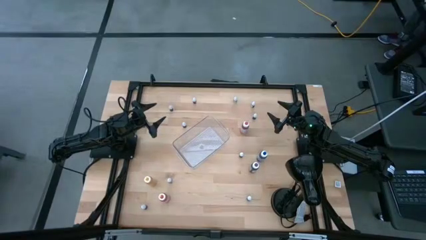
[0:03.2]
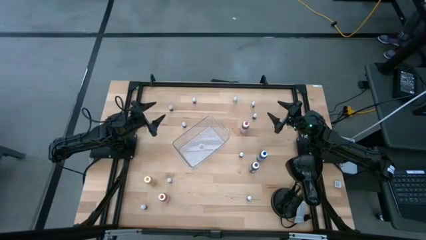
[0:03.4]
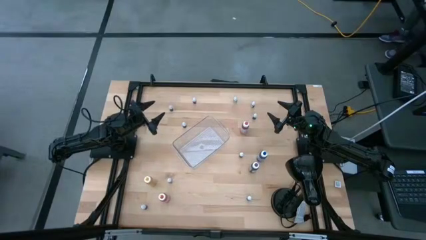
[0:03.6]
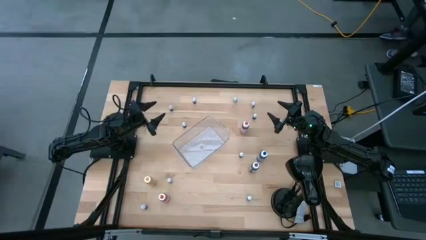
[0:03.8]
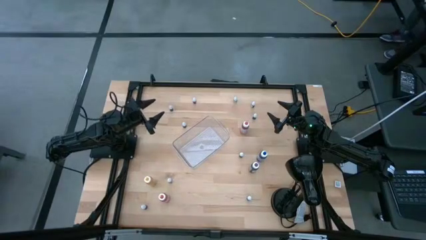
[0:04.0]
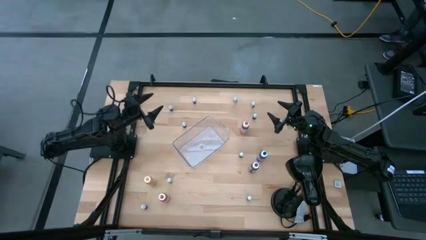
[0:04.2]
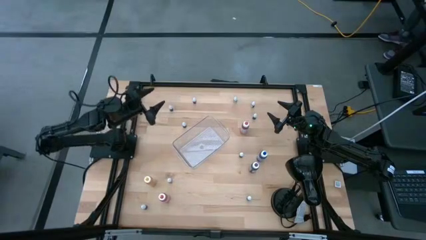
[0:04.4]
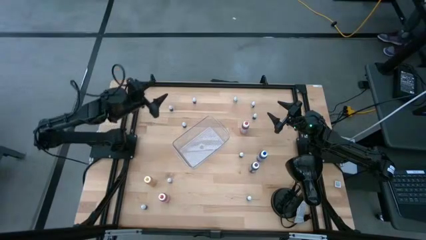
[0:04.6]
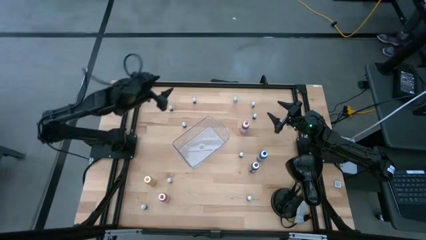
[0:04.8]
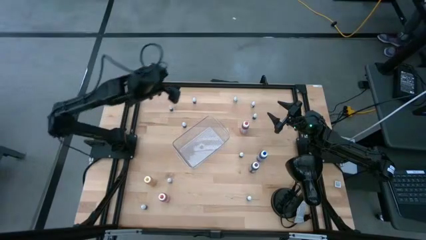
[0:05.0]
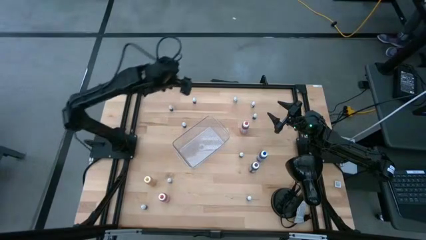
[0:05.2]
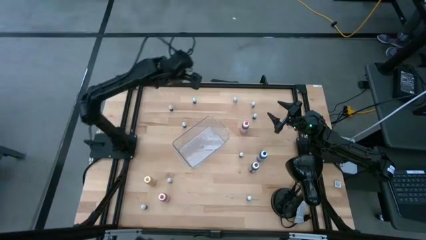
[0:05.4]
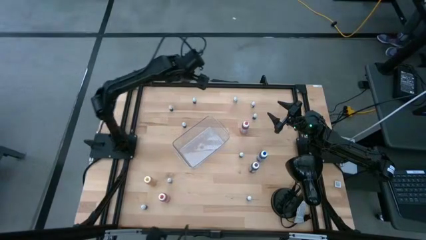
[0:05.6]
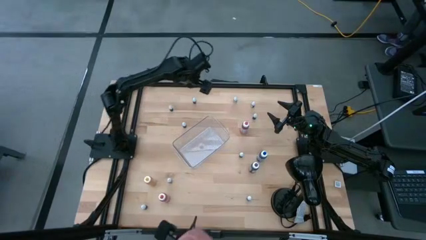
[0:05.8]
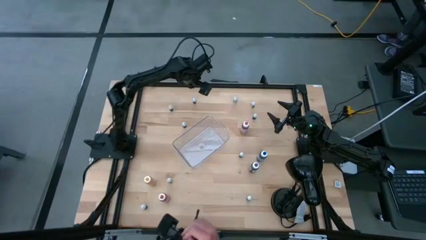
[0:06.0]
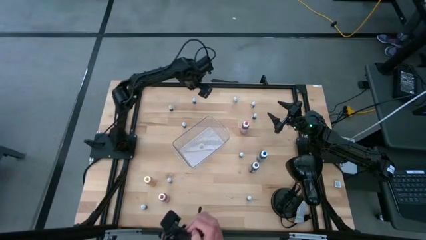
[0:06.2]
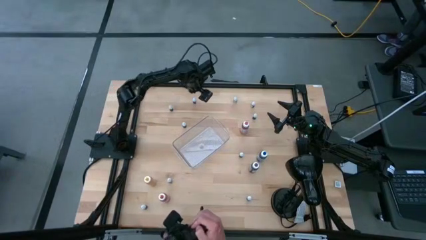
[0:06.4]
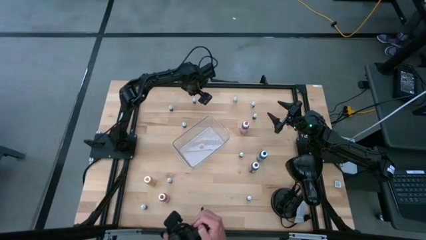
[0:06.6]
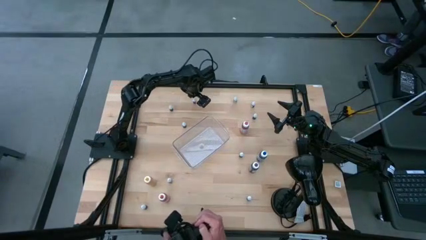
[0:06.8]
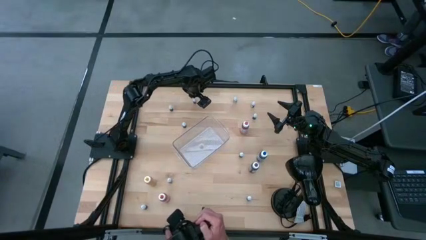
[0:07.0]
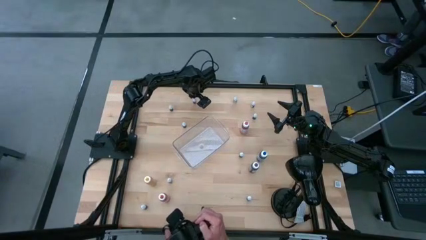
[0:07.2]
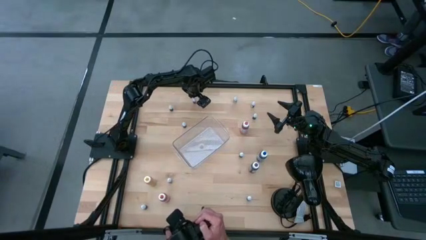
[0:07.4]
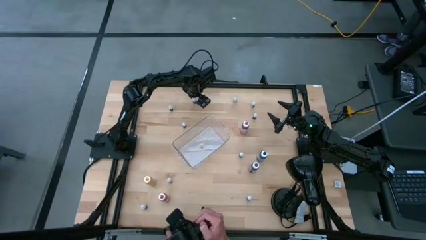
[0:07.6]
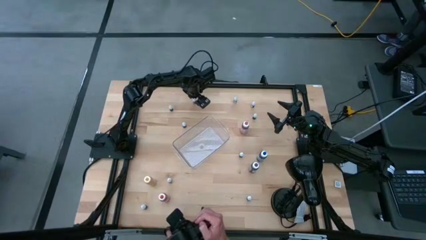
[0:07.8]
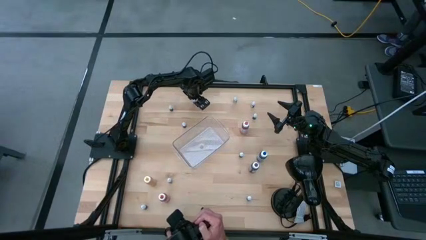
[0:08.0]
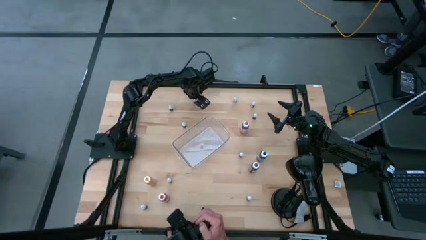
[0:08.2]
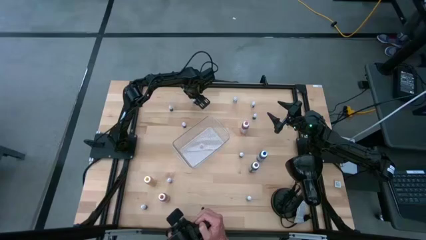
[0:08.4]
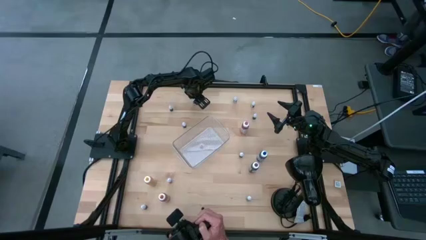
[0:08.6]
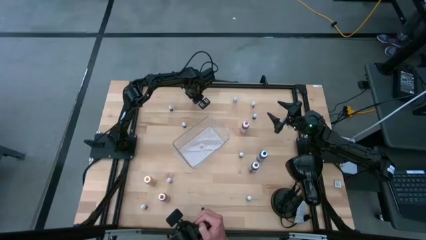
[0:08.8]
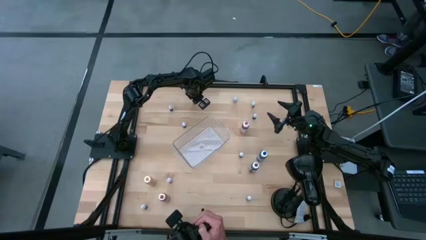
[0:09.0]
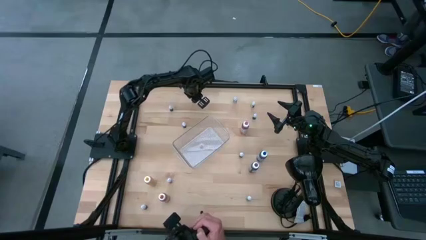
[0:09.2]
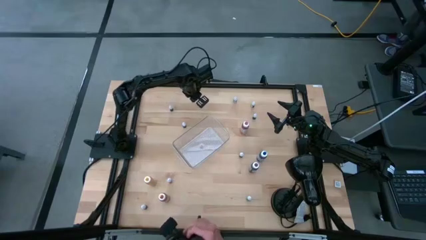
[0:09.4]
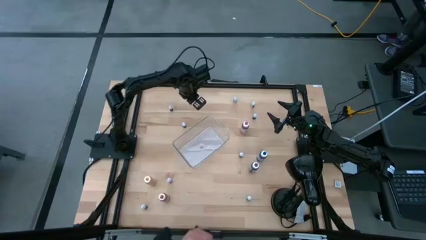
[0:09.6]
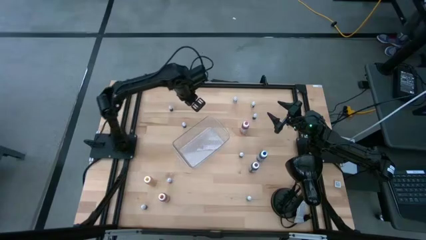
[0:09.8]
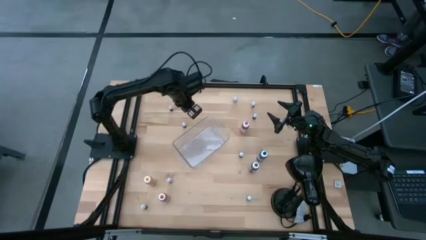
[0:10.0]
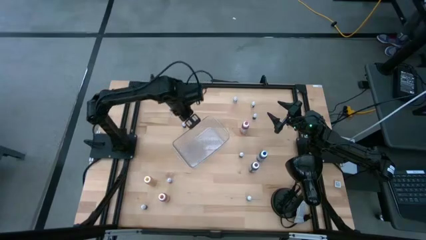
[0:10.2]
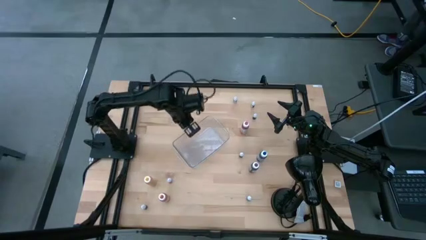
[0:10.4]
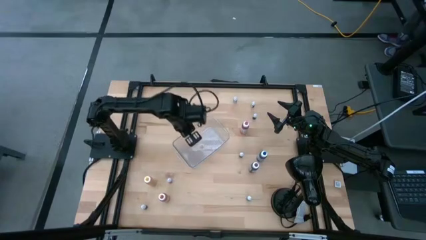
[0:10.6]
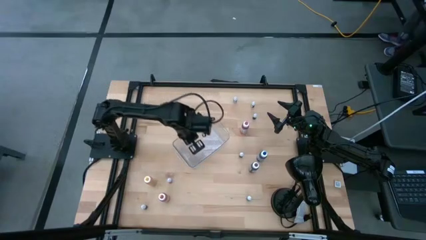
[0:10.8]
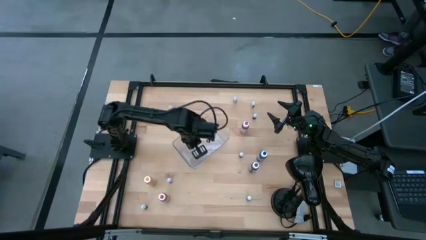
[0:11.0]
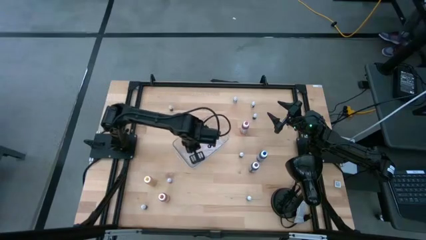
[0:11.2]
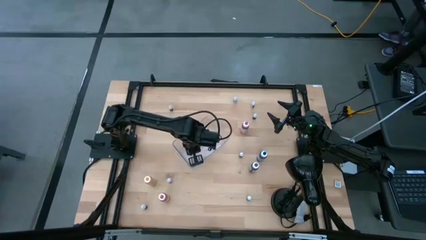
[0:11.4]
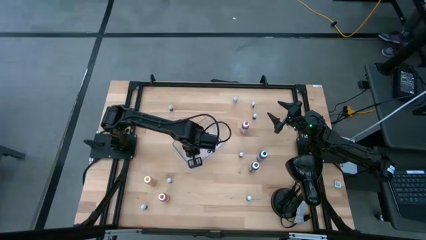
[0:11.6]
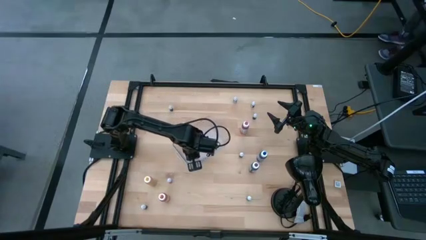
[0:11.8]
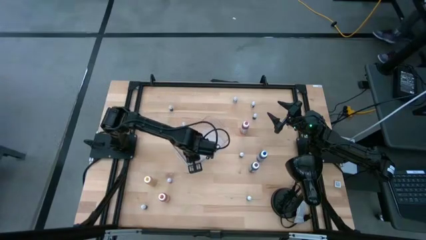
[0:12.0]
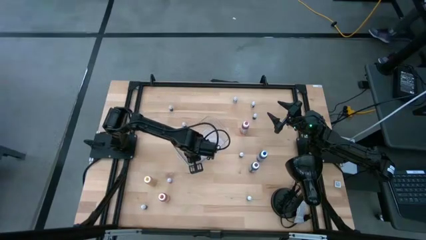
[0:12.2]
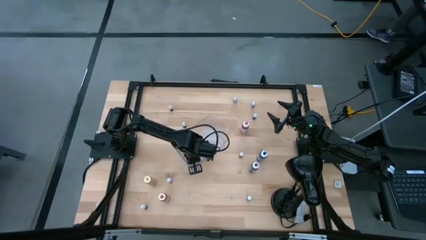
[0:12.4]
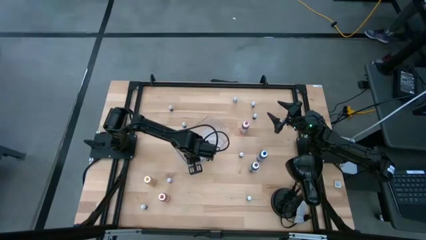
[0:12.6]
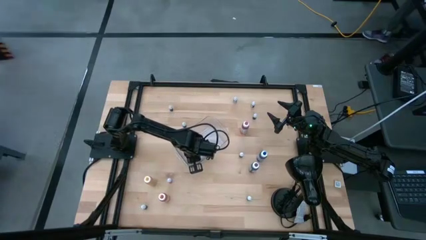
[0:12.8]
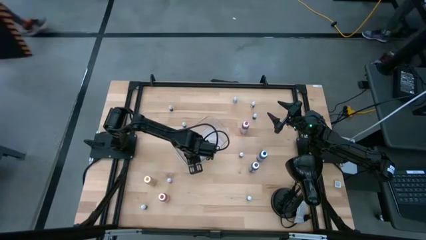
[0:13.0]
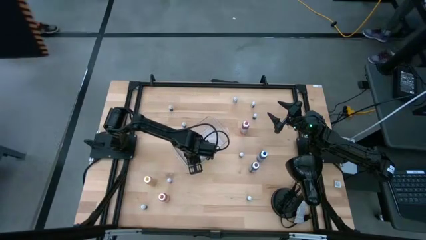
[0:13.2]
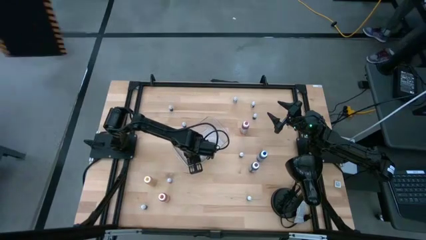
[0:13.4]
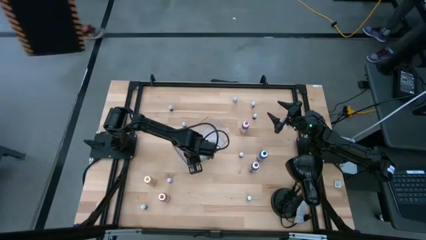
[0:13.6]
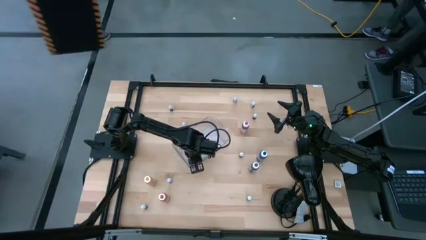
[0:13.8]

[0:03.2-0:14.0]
Task: Pick & Place food coloring
Put the small dark green food coloring bottle into the transparent bin

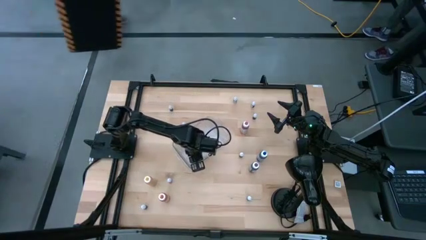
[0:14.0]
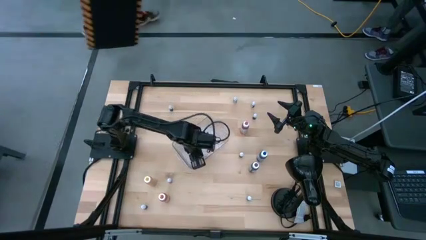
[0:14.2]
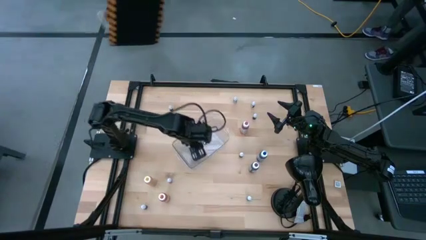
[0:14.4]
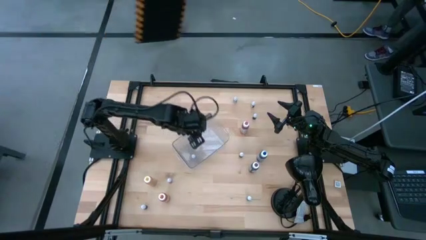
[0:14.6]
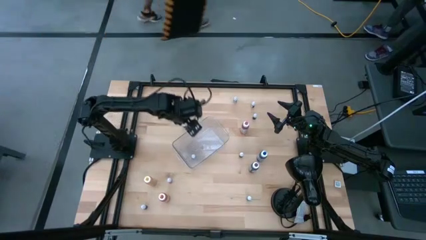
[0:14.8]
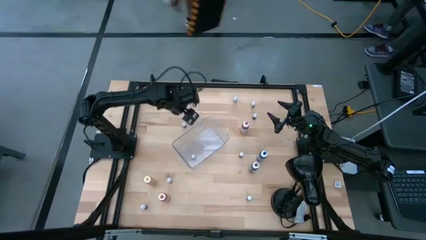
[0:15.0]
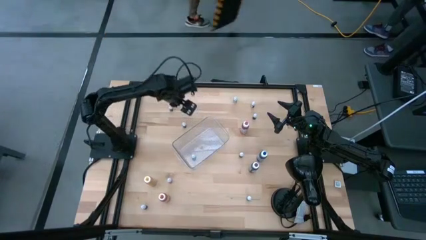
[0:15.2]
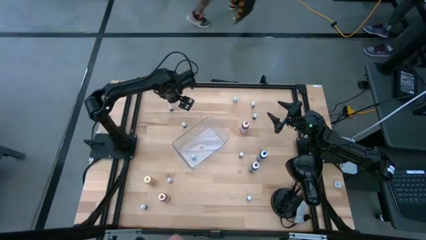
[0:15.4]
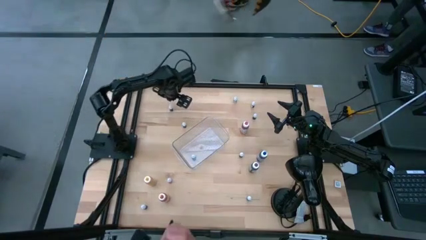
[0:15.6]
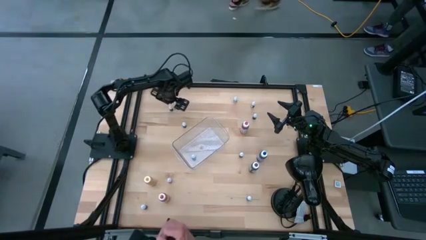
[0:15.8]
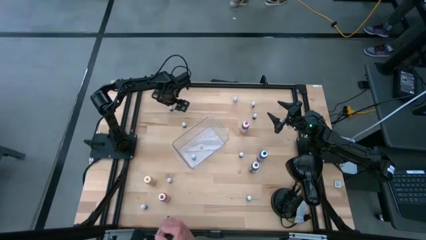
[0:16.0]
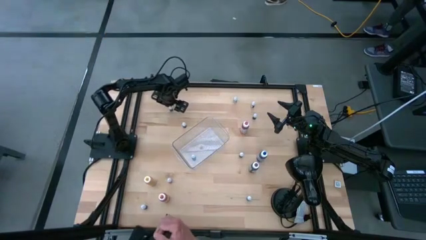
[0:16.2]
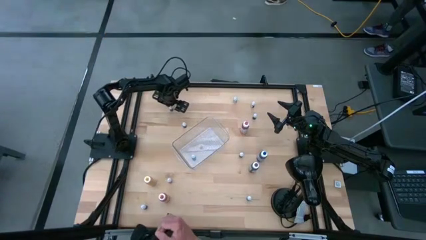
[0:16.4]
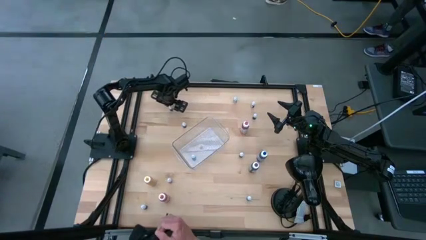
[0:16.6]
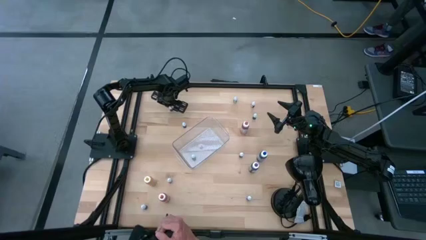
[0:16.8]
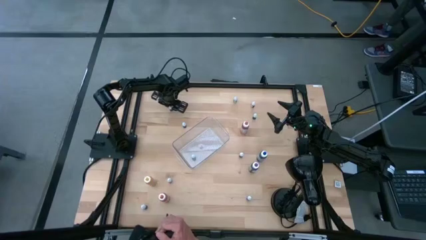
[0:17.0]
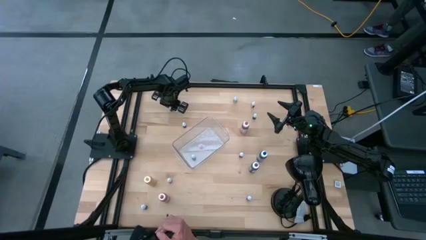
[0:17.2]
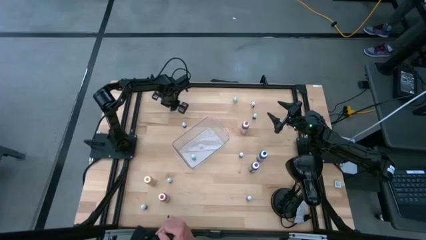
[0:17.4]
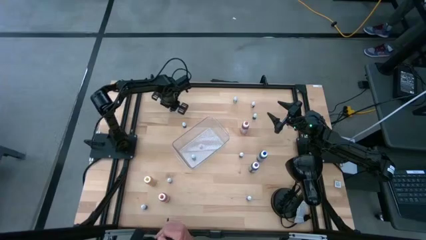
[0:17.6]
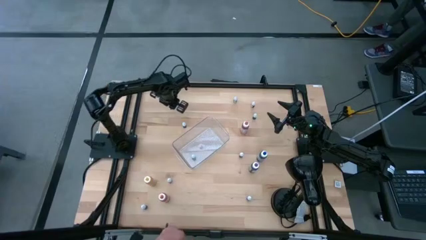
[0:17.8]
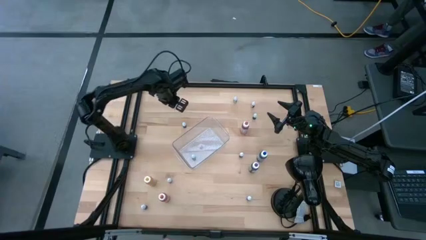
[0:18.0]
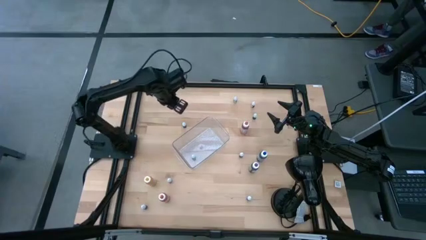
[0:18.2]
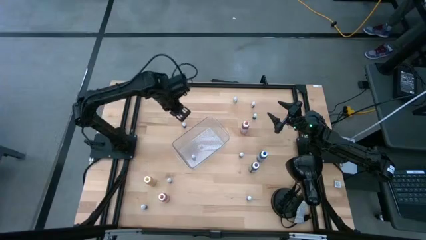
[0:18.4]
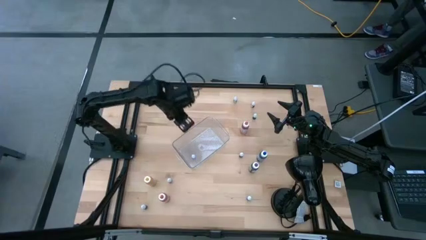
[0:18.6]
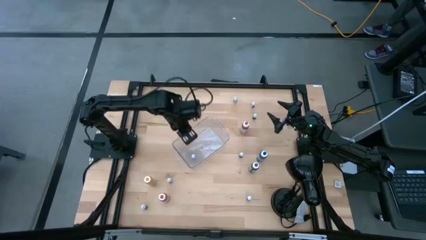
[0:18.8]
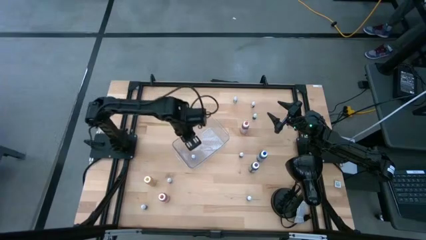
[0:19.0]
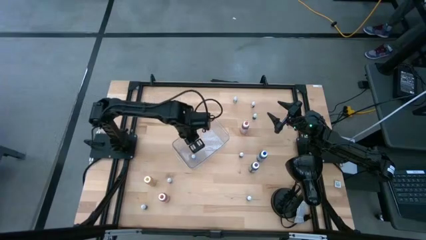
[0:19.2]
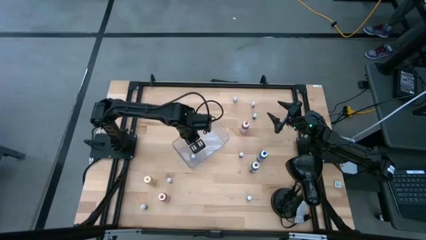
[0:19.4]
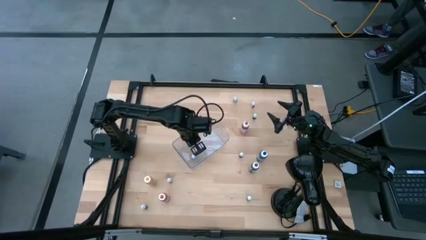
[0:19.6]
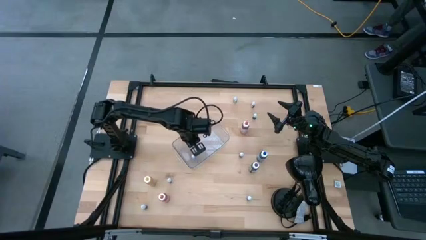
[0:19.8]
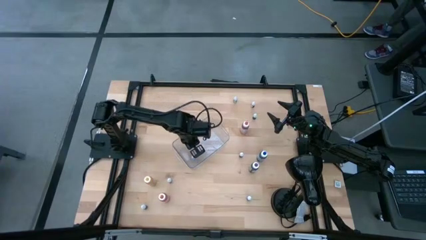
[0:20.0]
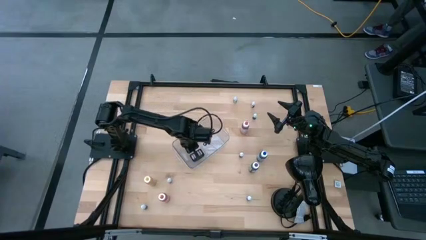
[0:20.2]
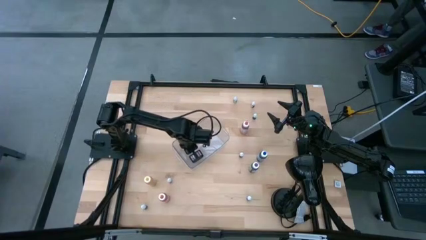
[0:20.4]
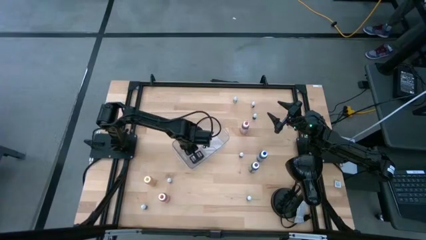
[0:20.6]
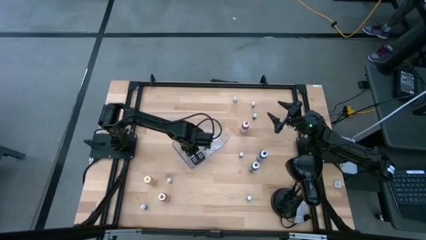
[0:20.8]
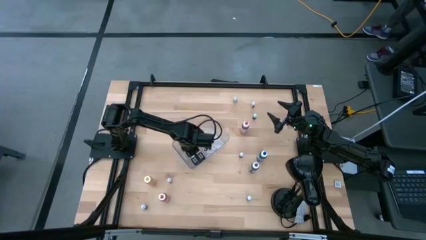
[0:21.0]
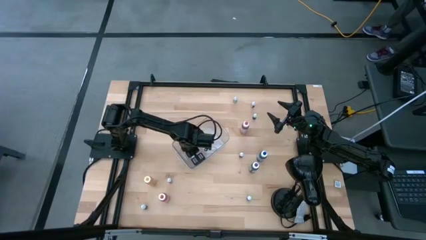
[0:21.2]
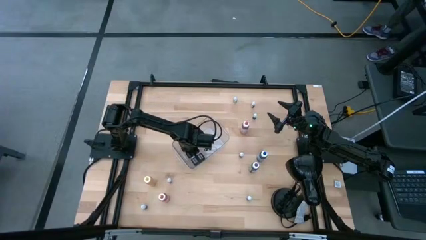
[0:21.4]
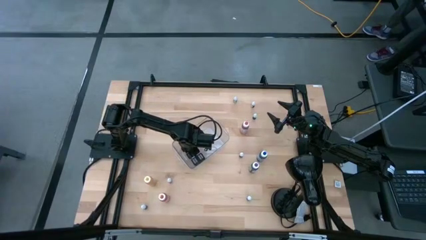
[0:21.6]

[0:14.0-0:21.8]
Put the left small blue food coloring bottle into the transparent bin
